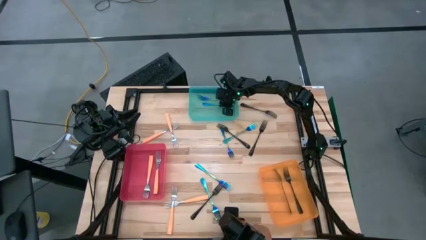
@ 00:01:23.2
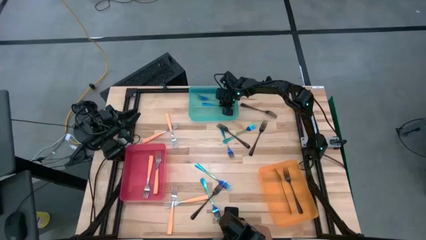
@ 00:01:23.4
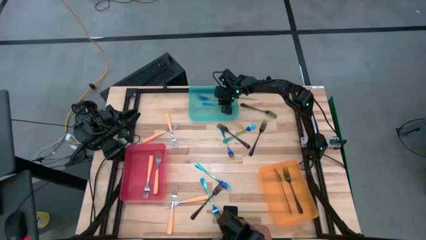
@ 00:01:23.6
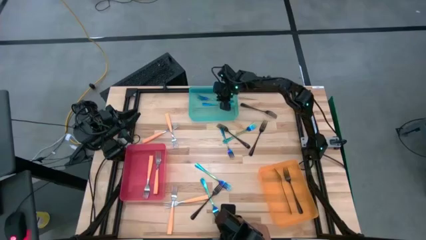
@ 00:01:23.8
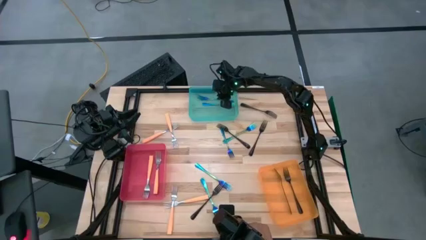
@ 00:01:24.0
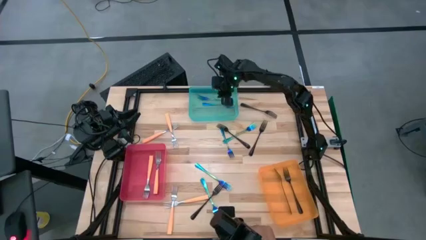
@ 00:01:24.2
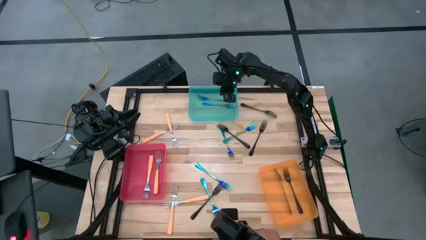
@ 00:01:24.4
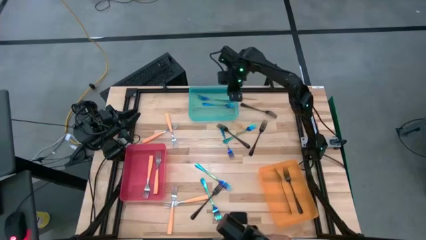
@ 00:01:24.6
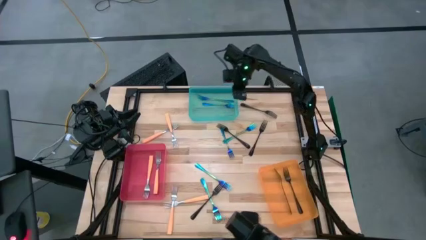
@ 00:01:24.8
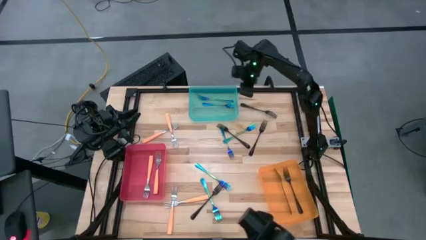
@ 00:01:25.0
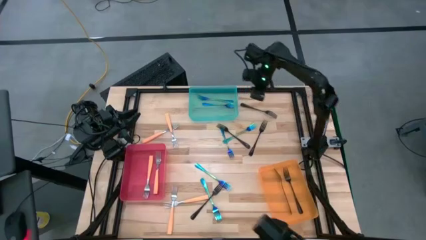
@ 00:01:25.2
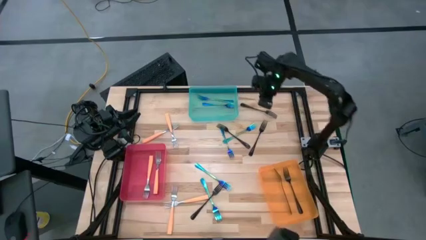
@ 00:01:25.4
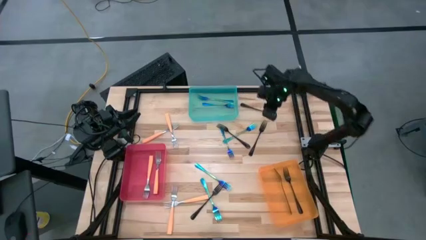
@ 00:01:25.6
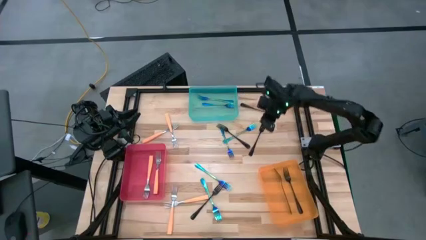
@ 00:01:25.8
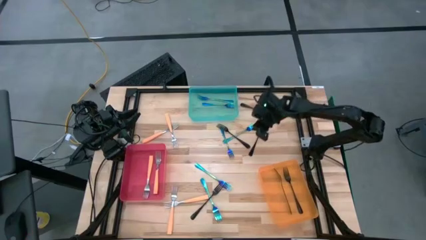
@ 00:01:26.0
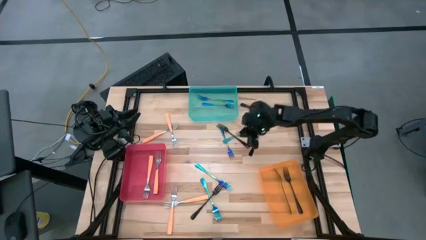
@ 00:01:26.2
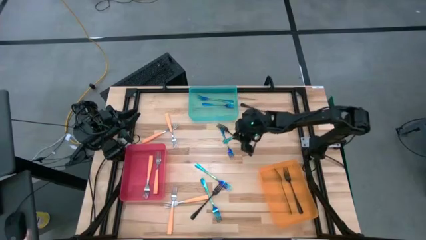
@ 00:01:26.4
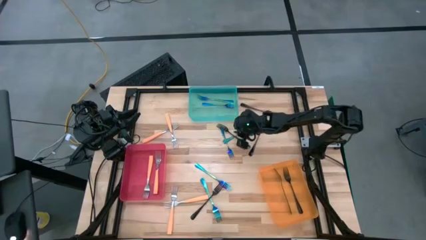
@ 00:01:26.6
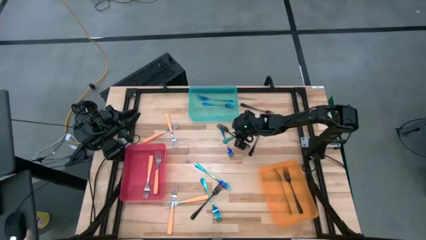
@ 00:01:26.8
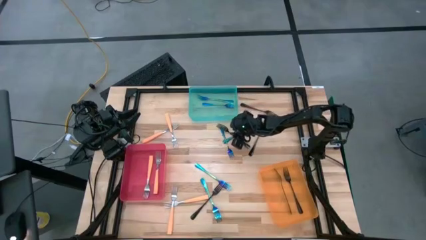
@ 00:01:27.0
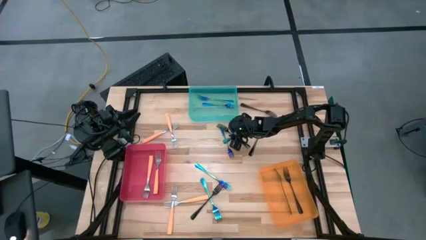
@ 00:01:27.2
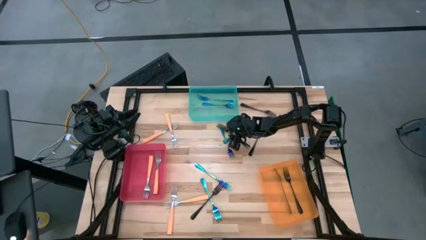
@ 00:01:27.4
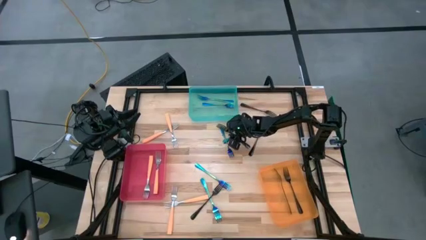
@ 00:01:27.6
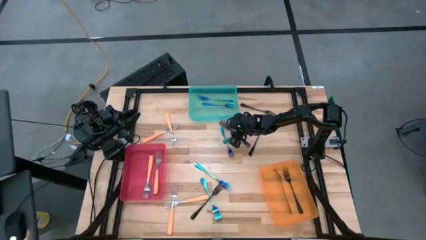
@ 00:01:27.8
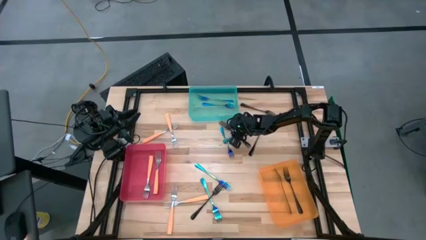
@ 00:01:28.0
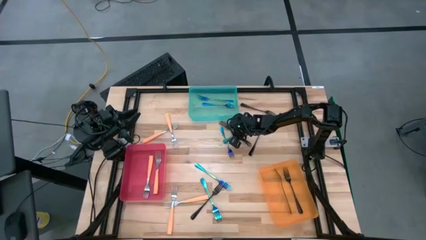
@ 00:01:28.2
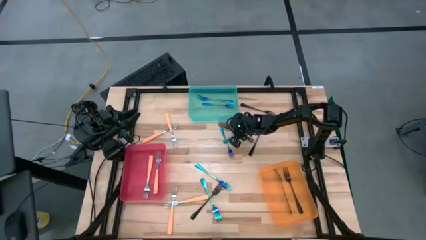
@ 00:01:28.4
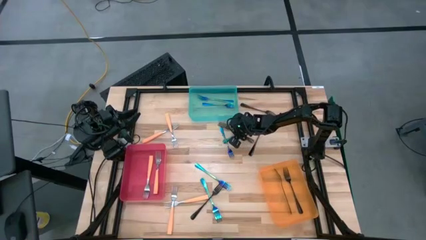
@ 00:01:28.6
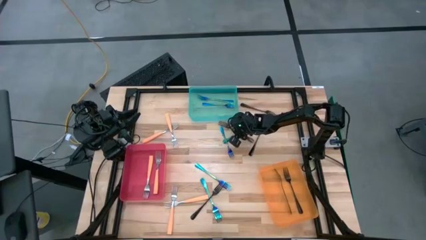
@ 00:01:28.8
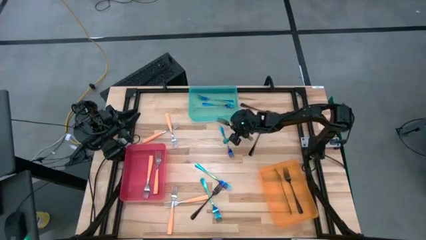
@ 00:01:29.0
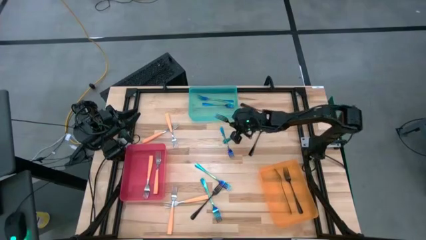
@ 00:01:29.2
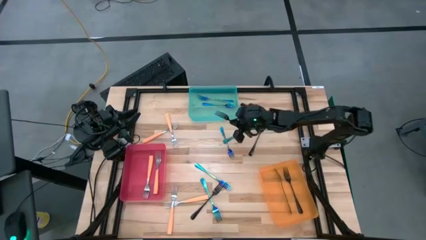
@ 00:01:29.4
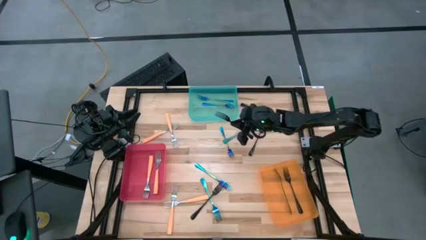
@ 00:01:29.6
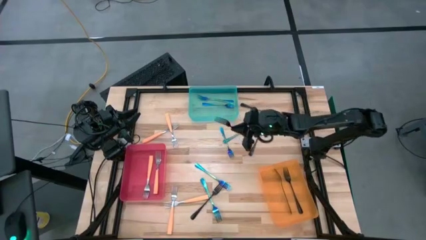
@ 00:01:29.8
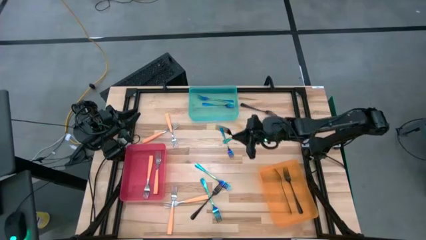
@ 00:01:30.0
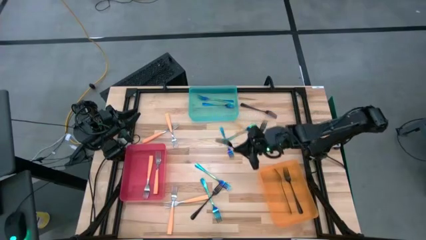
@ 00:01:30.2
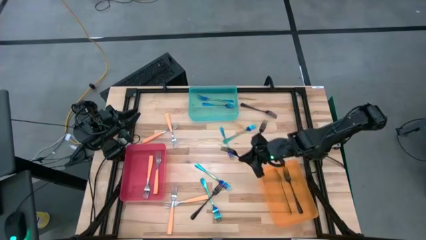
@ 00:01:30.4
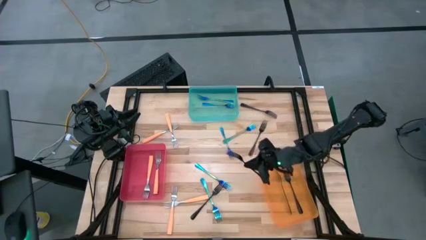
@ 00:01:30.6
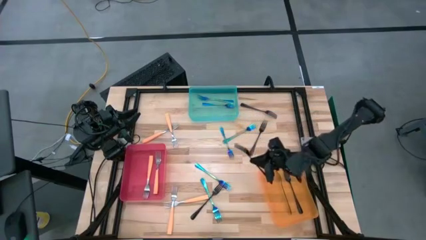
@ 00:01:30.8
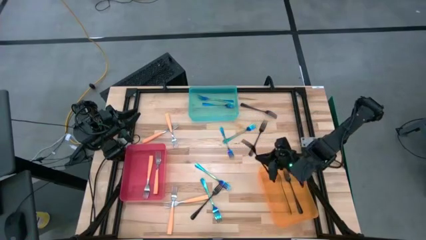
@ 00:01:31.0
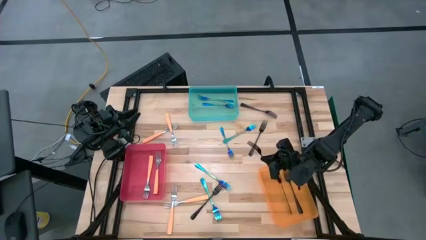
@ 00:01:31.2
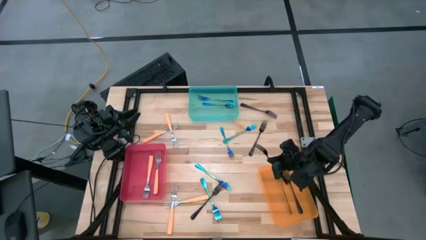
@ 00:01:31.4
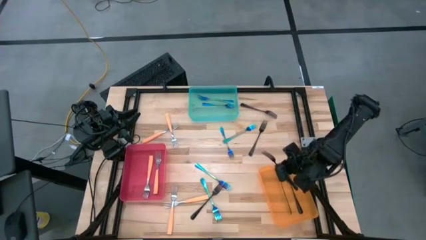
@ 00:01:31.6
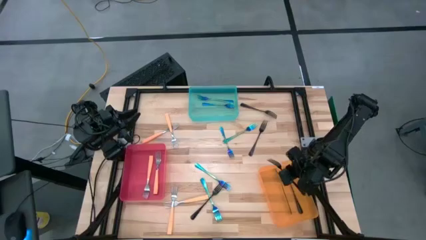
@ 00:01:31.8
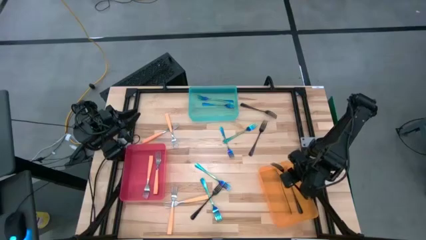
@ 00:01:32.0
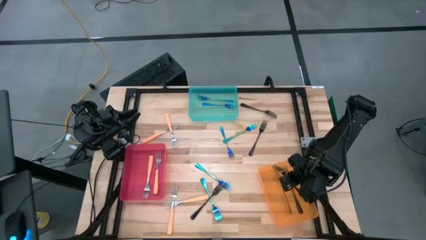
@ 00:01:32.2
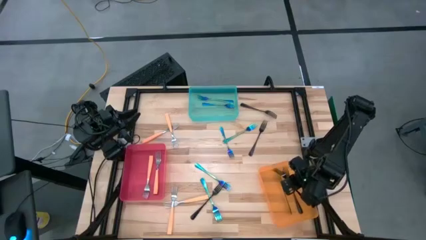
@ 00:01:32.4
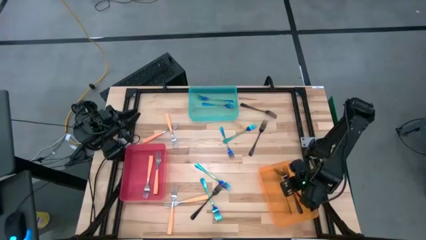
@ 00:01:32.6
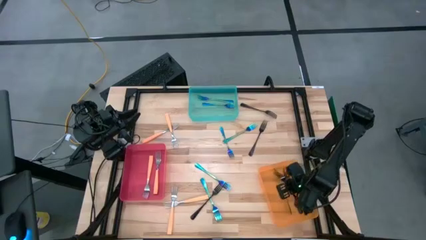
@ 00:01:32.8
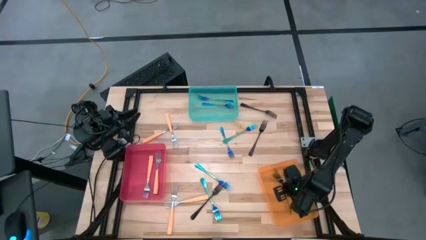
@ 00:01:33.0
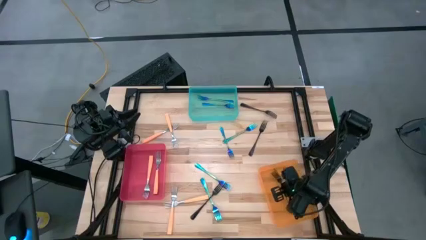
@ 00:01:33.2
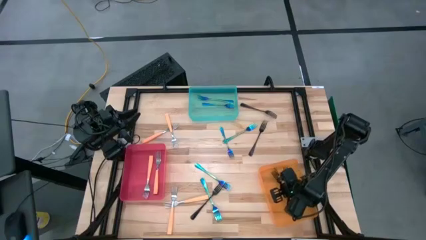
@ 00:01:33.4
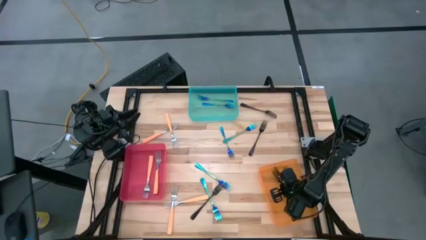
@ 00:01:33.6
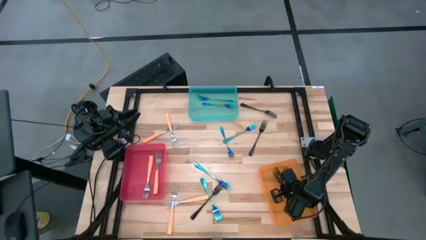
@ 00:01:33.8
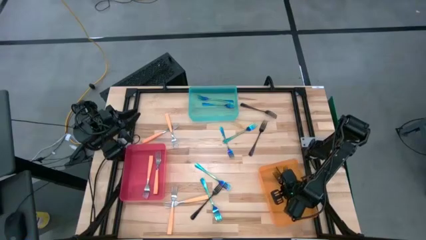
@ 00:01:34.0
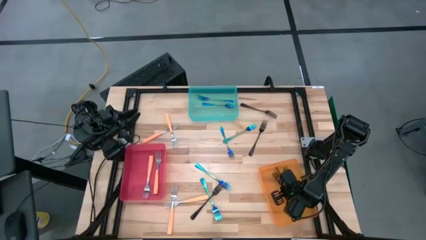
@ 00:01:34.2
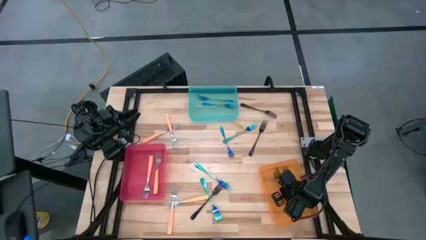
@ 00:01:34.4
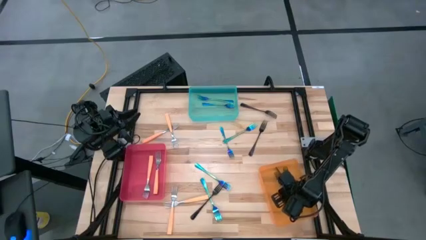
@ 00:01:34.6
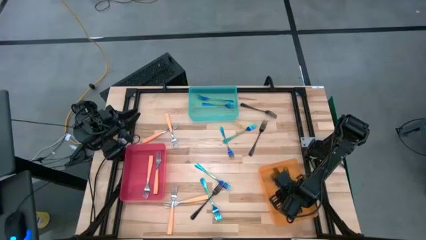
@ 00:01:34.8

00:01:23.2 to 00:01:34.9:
Task: Sort silverware by color (type)
Put the black fork into the orange bin

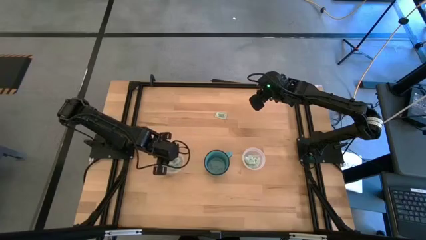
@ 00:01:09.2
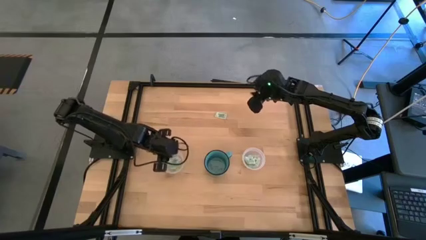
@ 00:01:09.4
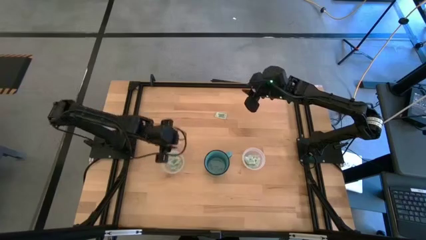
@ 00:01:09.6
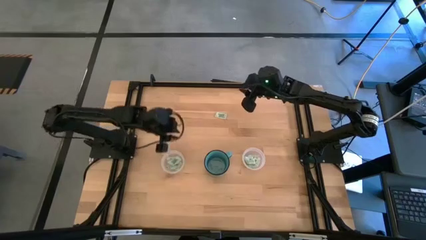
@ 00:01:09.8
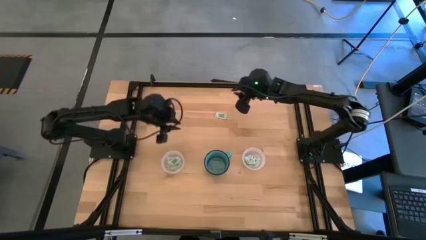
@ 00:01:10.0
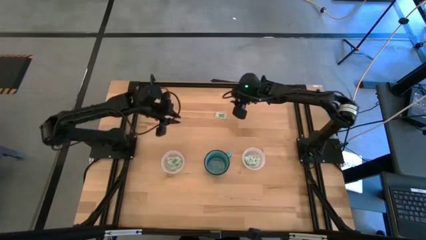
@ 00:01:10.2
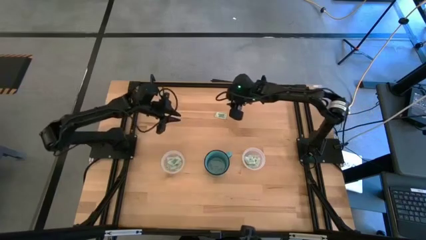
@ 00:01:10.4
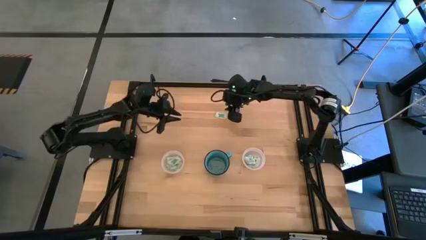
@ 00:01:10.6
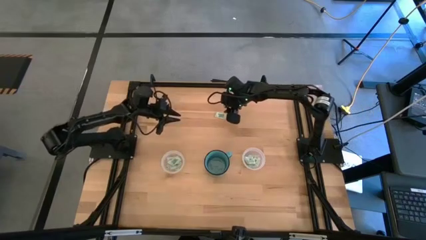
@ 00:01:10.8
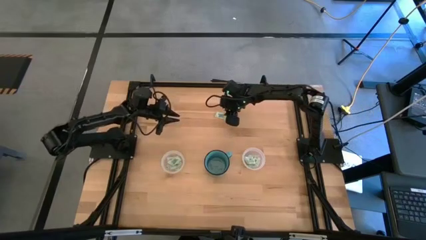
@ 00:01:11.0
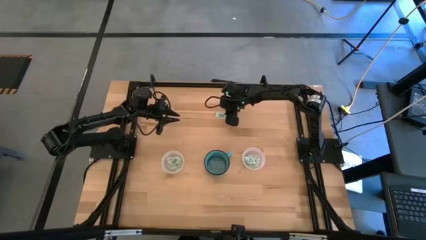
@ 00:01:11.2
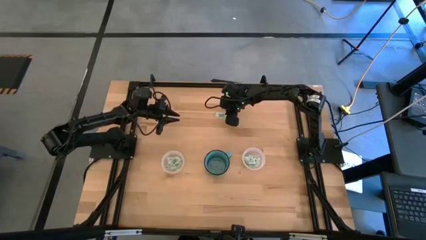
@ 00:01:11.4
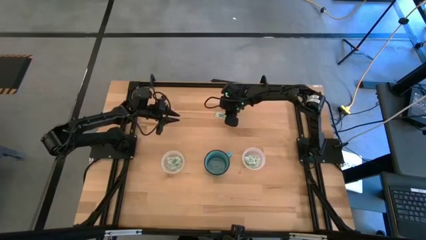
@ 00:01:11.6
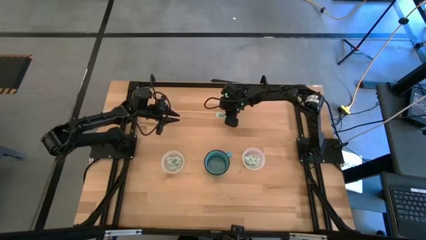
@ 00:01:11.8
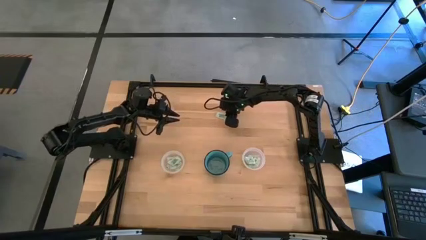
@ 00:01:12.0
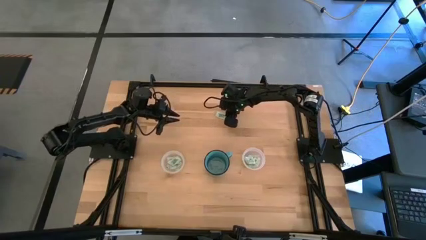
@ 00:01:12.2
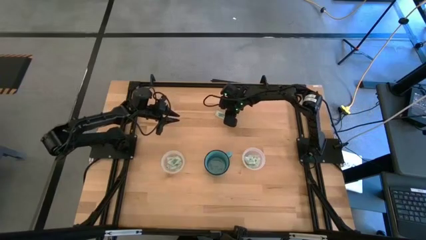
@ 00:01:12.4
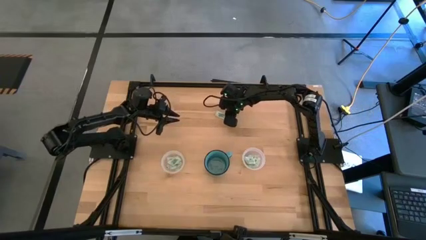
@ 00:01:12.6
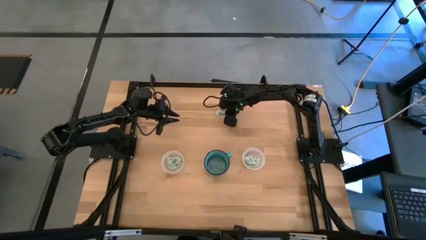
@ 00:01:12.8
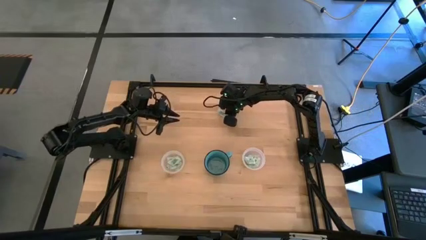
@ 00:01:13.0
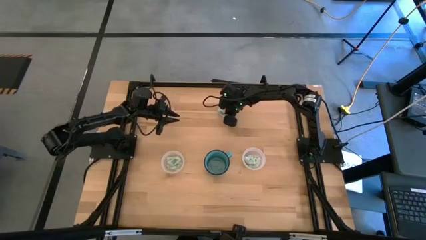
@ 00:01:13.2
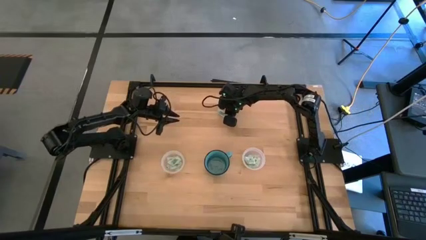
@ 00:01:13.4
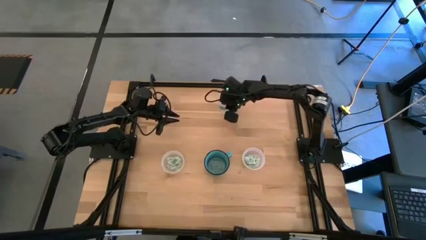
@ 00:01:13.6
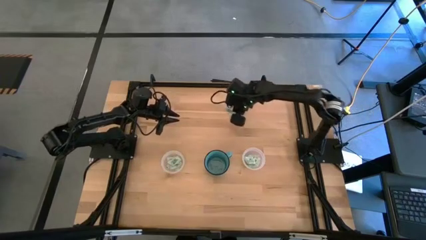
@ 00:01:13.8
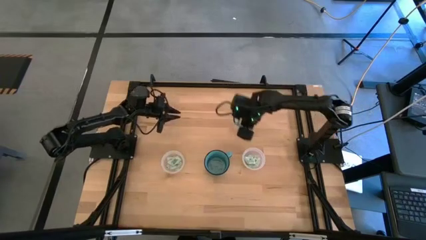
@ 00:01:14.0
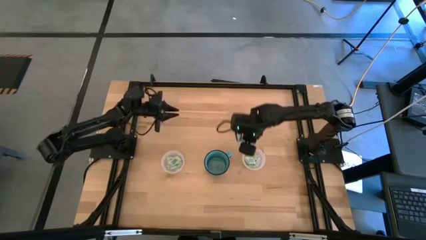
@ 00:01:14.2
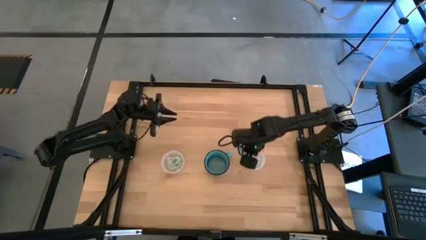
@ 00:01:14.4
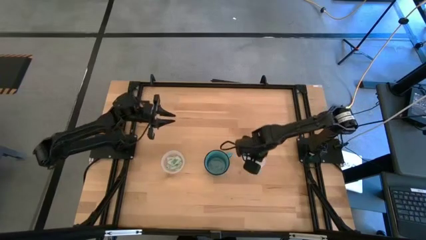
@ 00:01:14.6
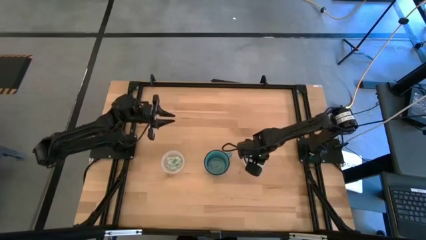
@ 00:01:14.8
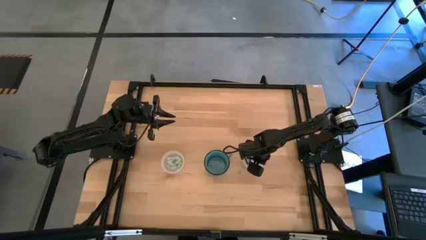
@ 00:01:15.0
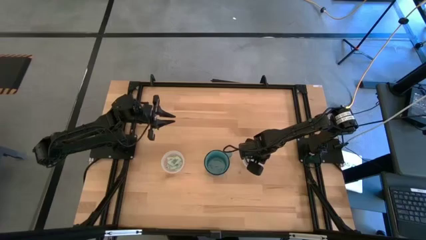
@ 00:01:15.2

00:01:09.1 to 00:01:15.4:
Task: Pick and place Stevia / Truvia into bins
Put the green stevia packet into the right transparent container
